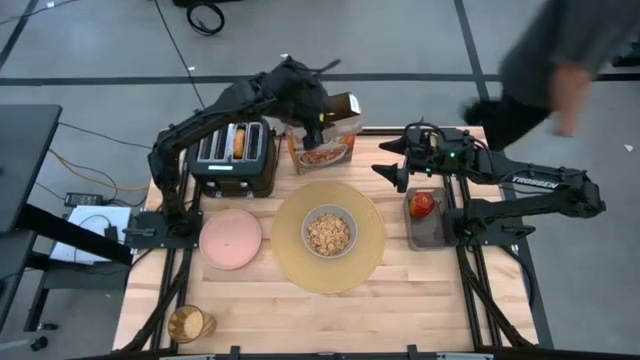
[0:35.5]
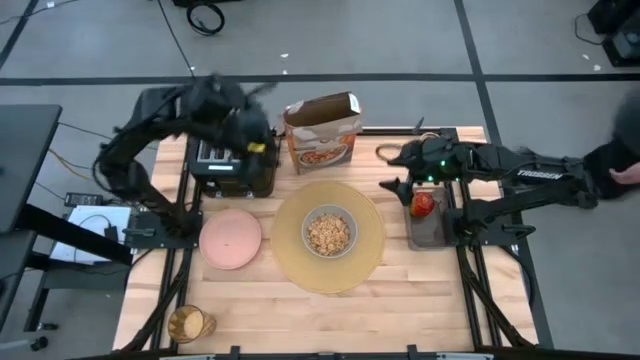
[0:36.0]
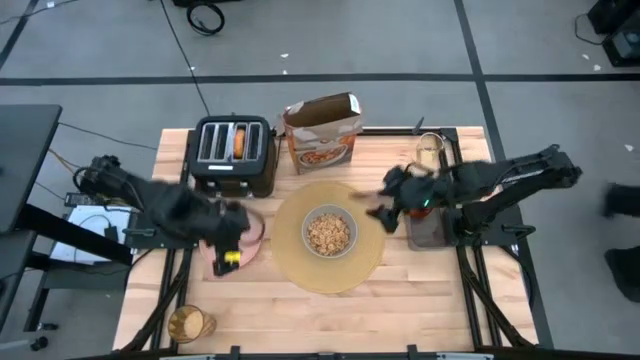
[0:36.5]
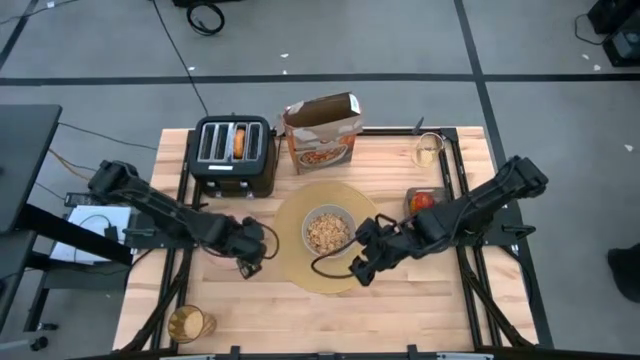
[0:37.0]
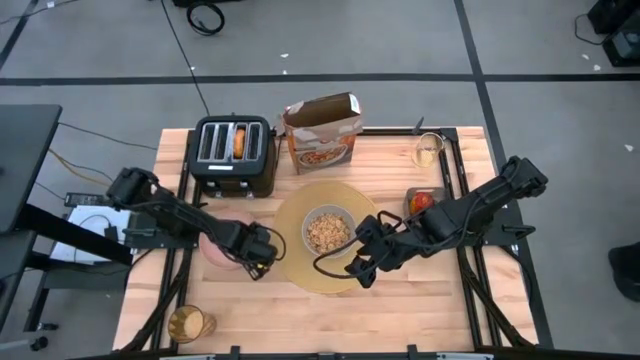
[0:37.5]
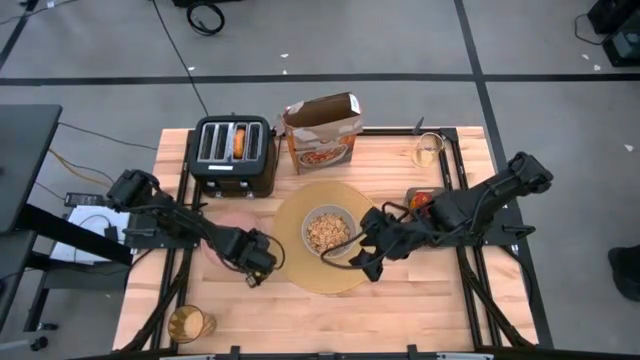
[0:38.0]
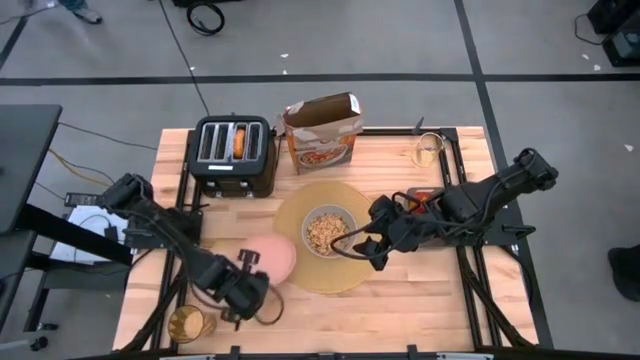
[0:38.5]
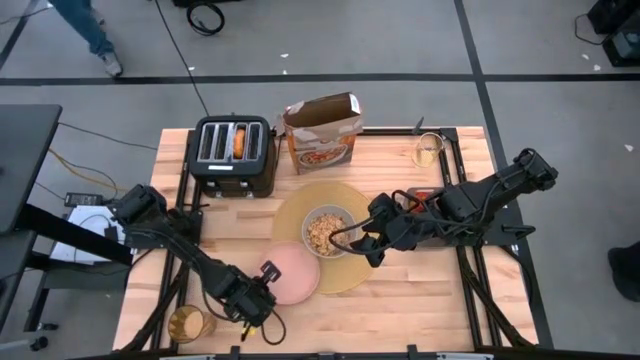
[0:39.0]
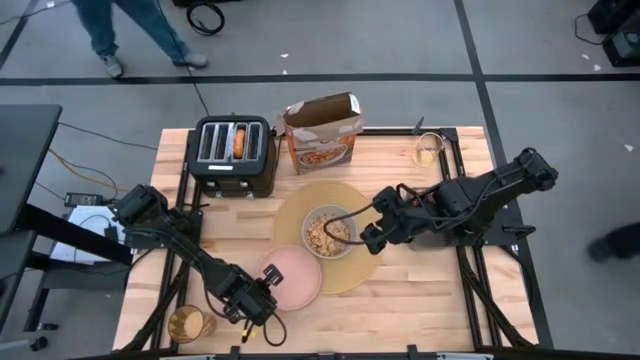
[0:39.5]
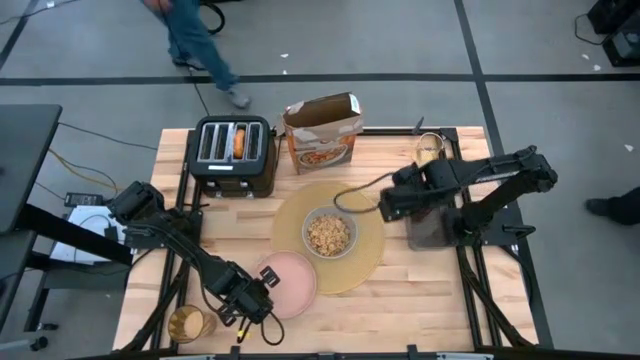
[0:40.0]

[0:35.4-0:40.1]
Task: Arrange a breakfast setting
Move the pink plate to the bottom left of the brown table mat

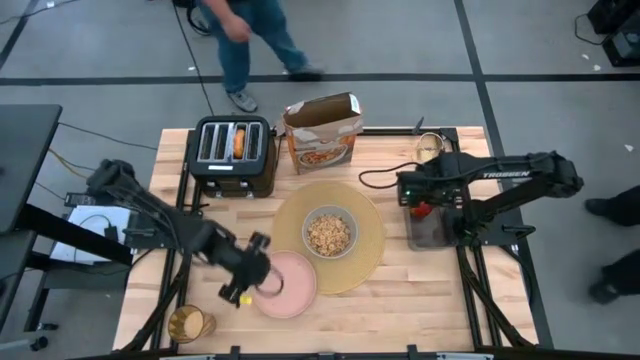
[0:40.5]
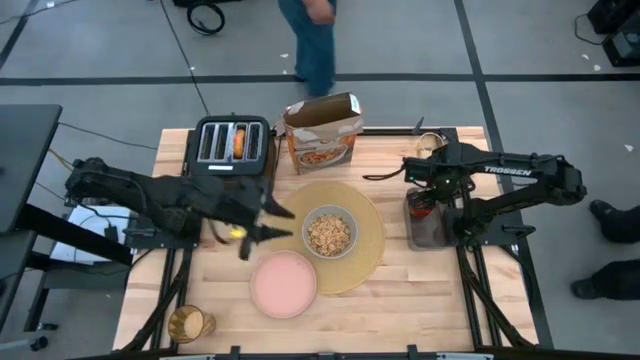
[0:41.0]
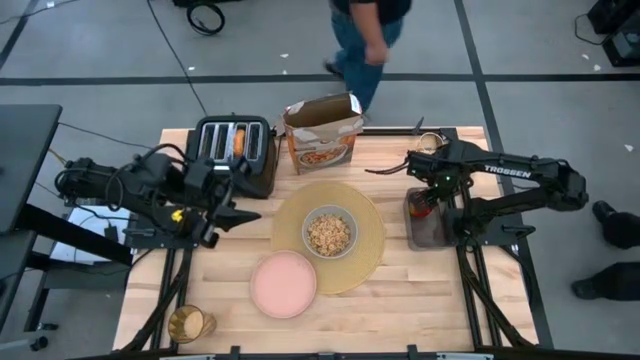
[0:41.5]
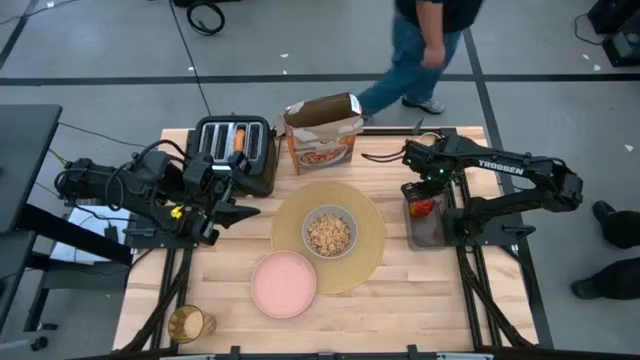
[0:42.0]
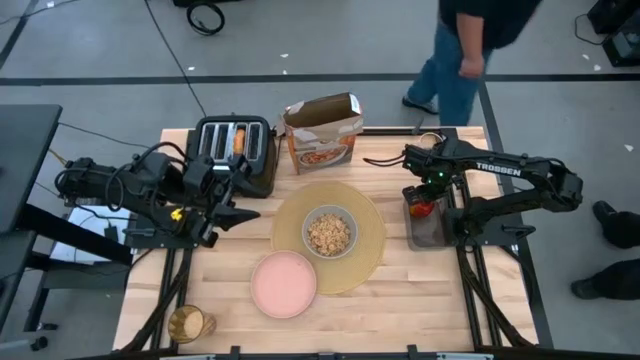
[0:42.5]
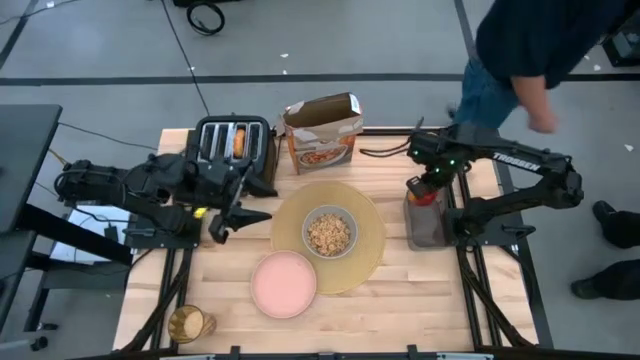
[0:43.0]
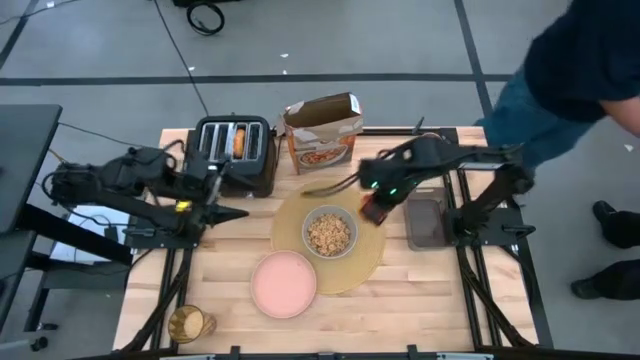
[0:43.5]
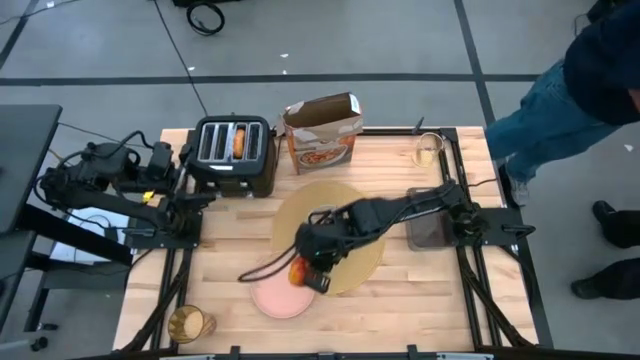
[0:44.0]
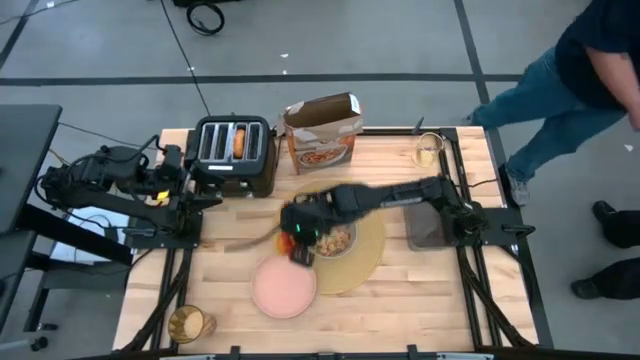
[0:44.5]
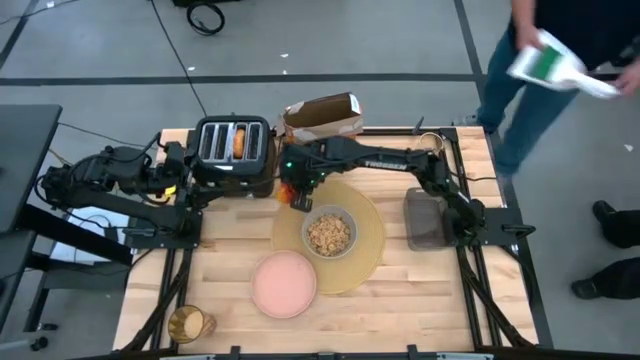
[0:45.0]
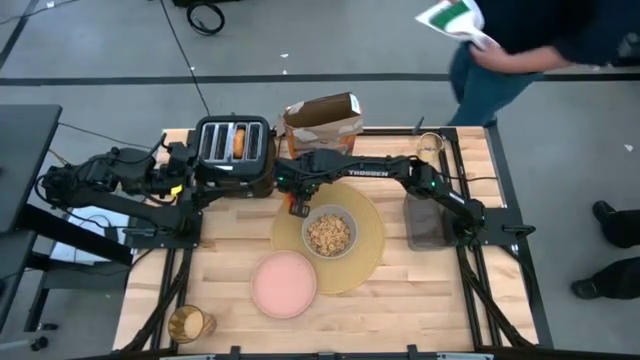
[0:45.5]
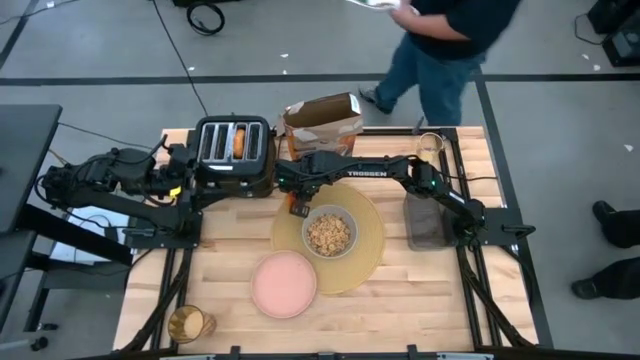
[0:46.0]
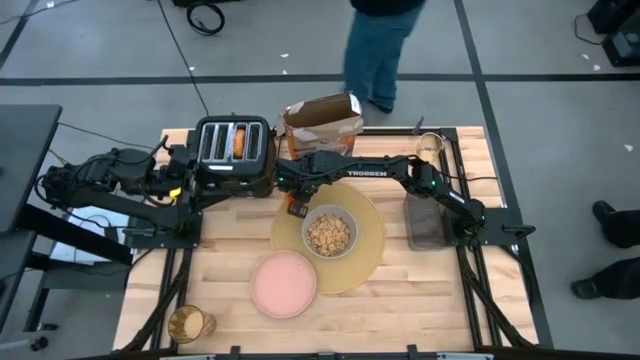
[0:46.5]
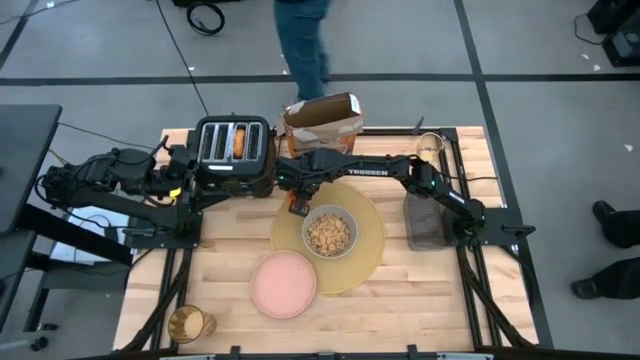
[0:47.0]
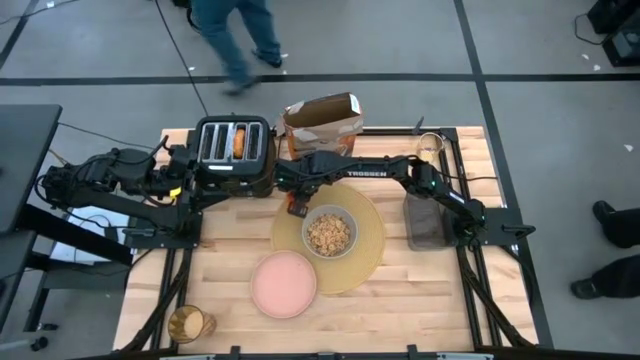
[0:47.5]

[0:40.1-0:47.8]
Put the apple on the brown table mat to the top left of the gray bowl

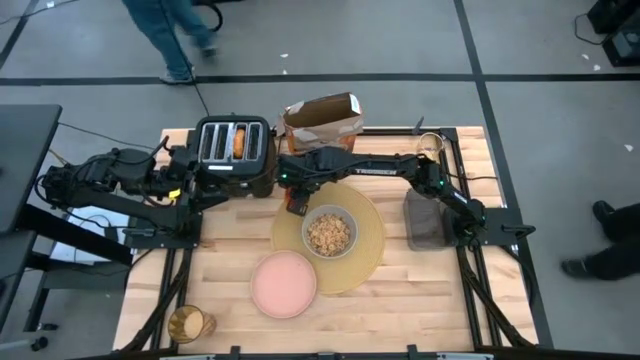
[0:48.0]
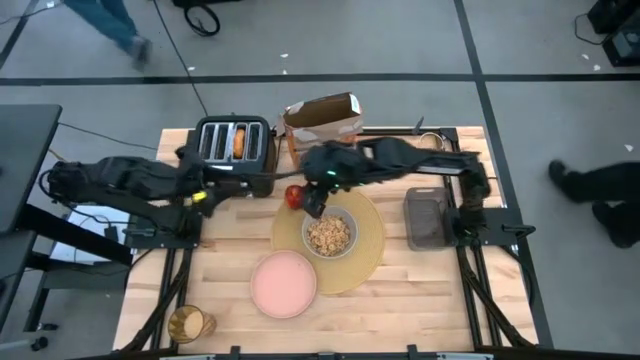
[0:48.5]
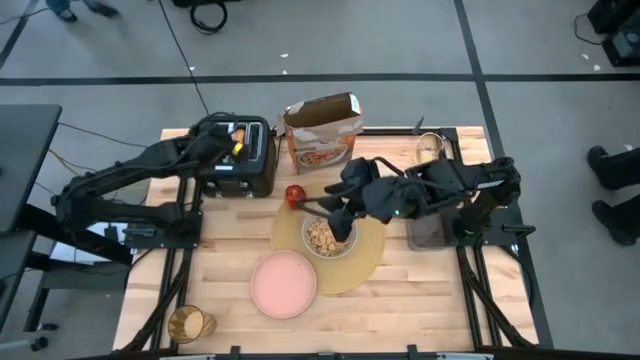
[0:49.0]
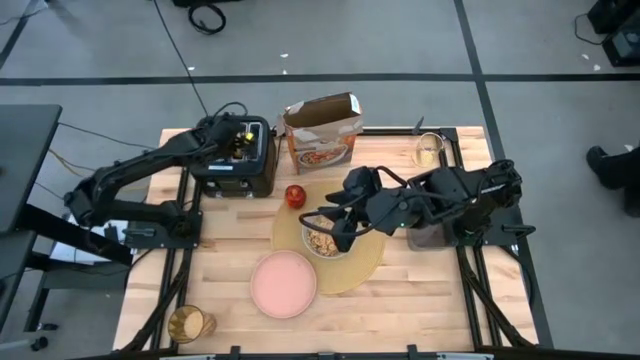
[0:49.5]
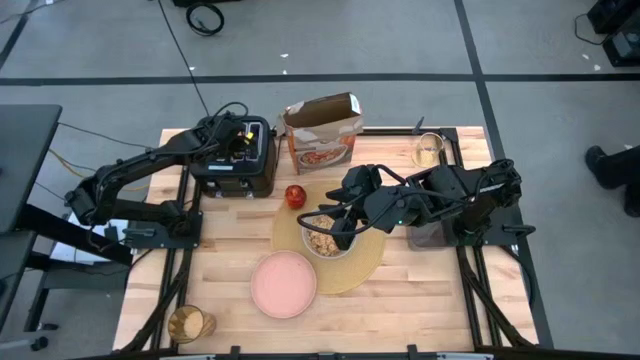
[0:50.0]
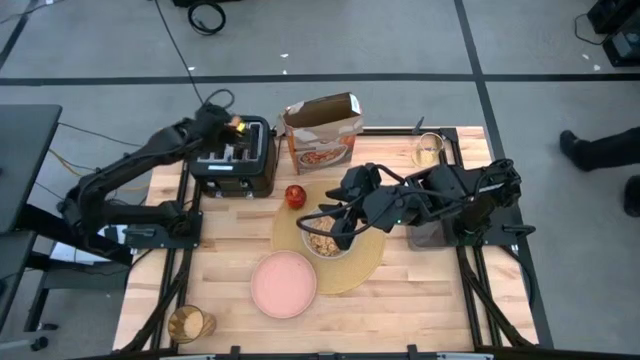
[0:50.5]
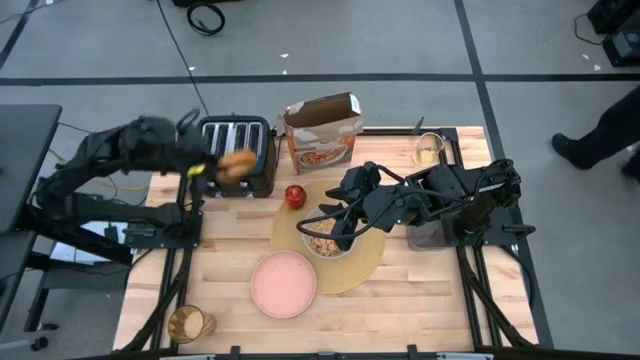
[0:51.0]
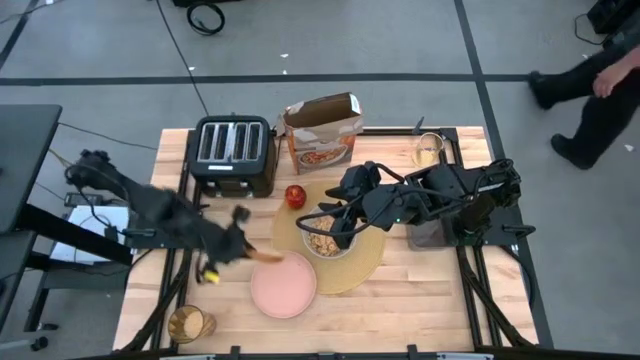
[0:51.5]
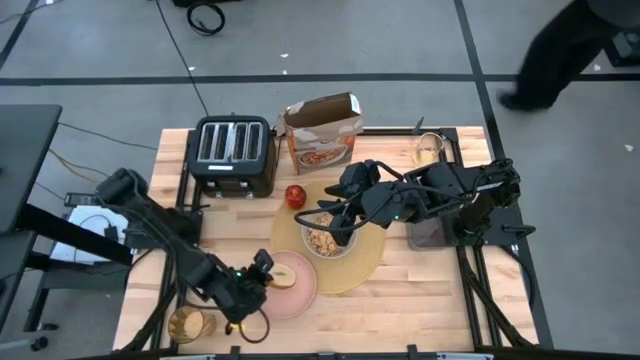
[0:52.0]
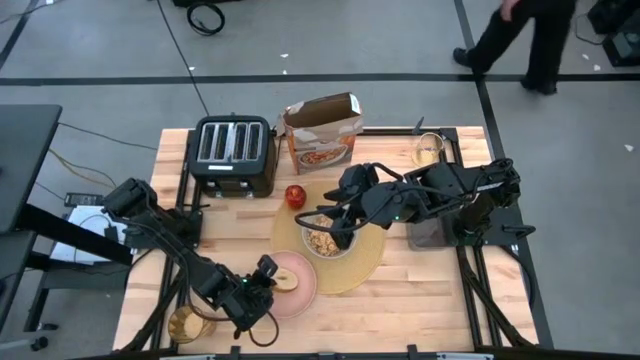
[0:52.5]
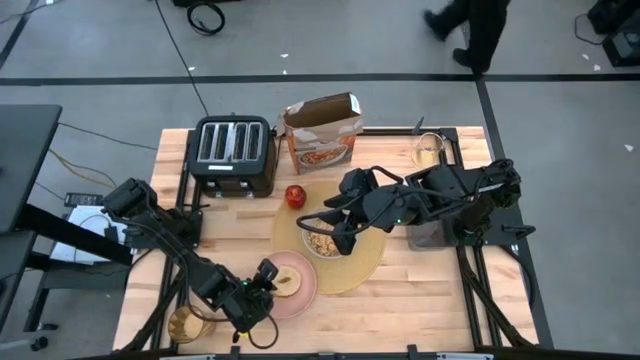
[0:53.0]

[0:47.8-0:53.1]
Put the bagel from the toaster onto the pink plate

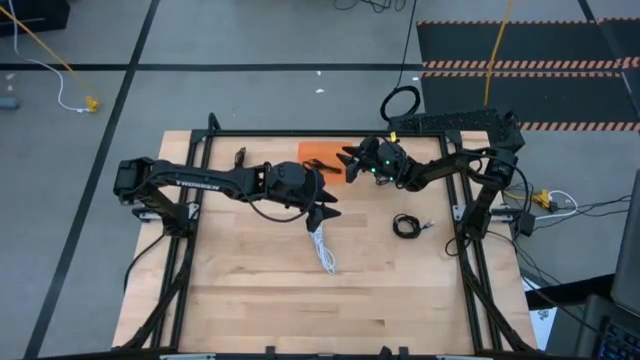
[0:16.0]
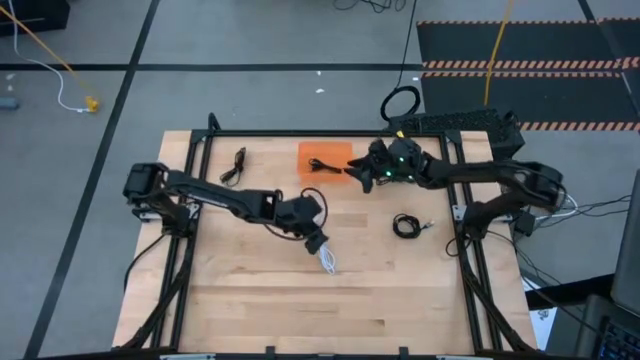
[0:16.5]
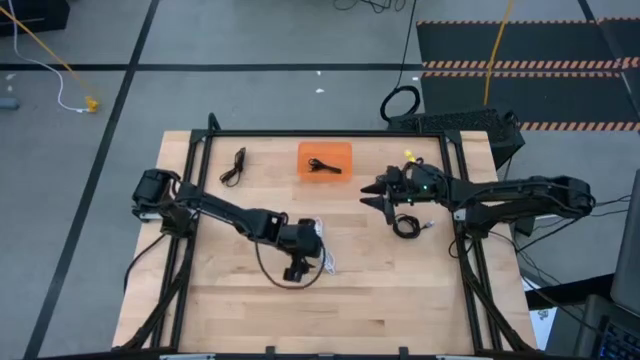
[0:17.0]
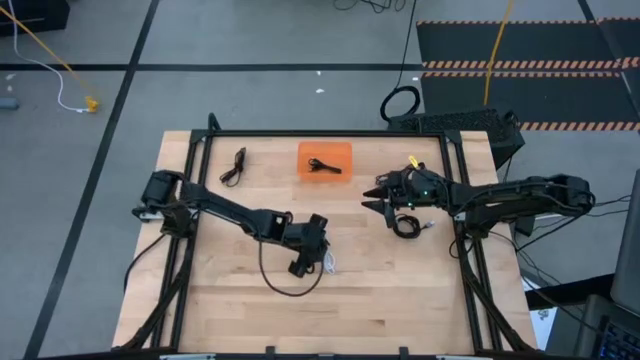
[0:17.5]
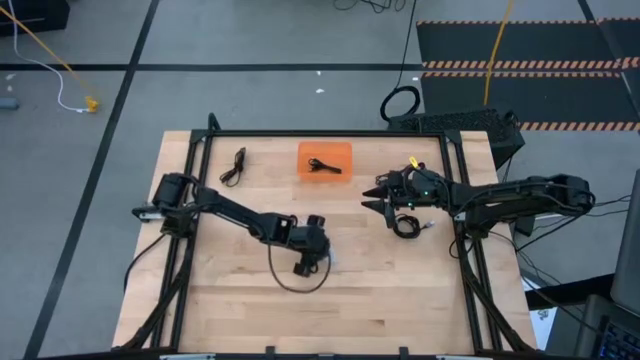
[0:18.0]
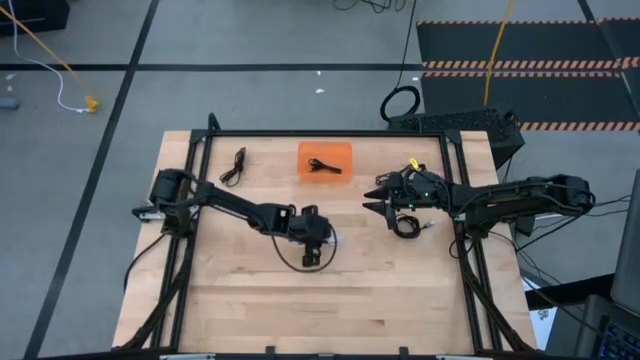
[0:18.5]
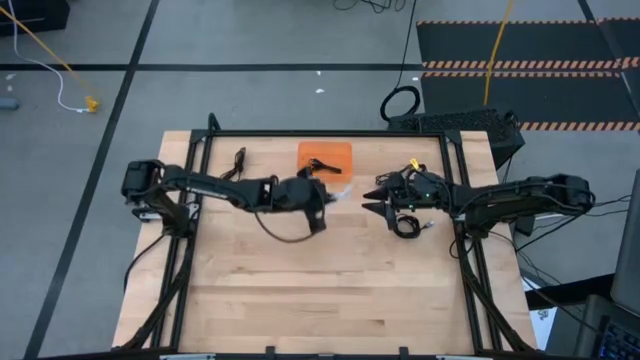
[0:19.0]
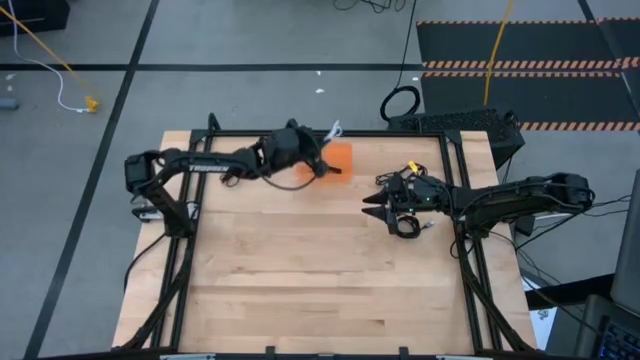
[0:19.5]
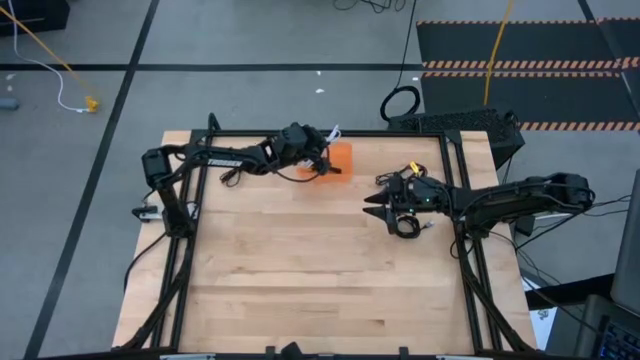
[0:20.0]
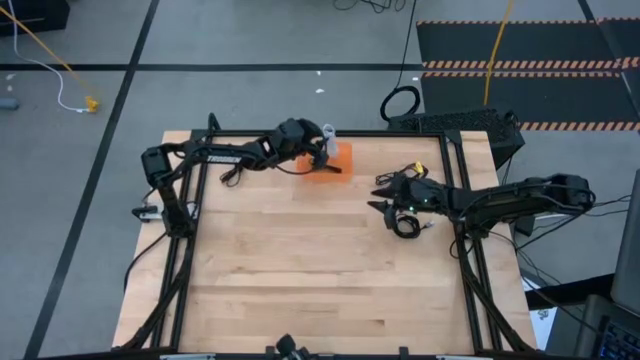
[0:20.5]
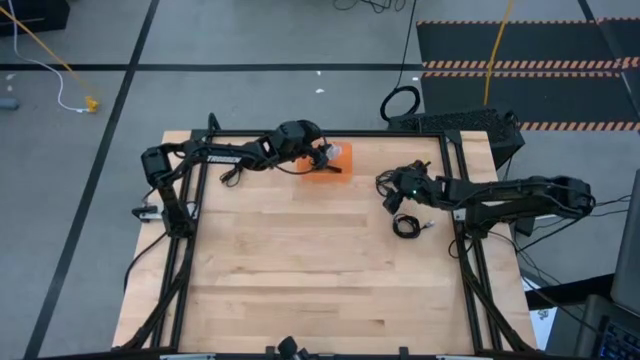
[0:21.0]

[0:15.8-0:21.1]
Task: Pick and place USB-C Cables
Put the white charger cable into the orange bin
